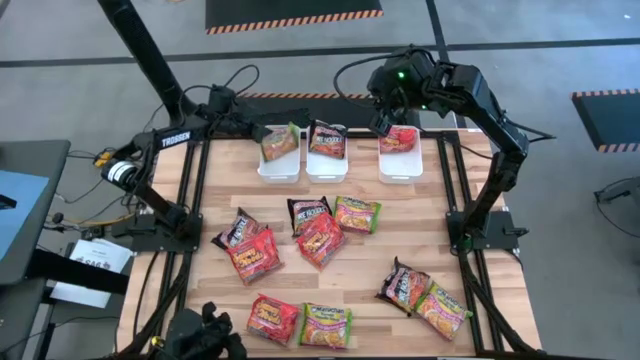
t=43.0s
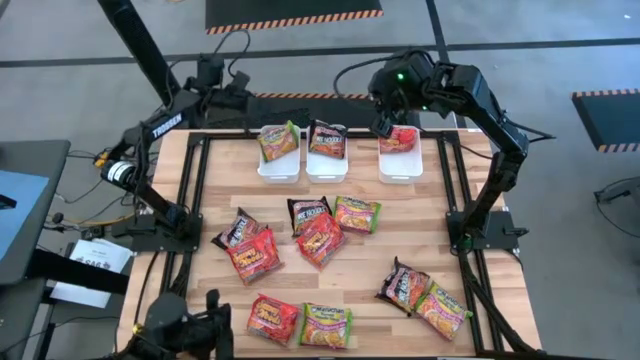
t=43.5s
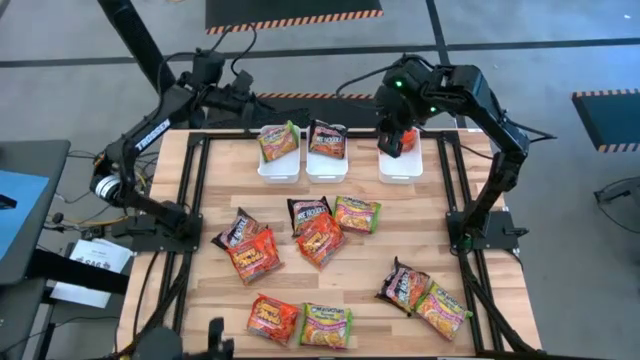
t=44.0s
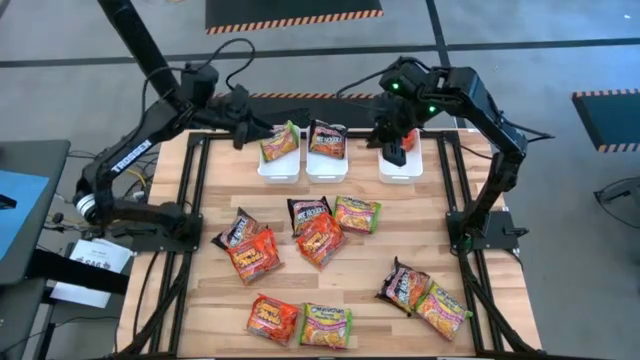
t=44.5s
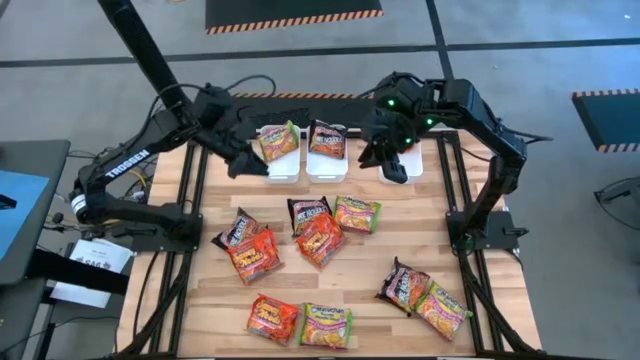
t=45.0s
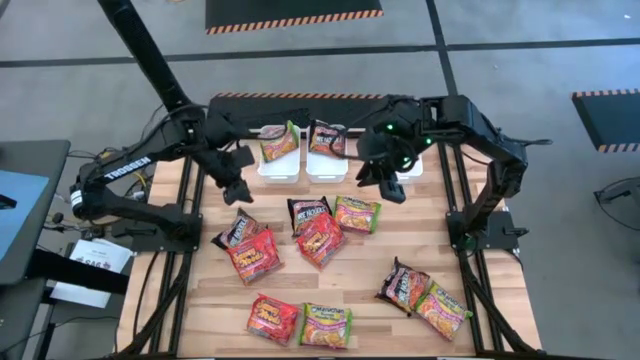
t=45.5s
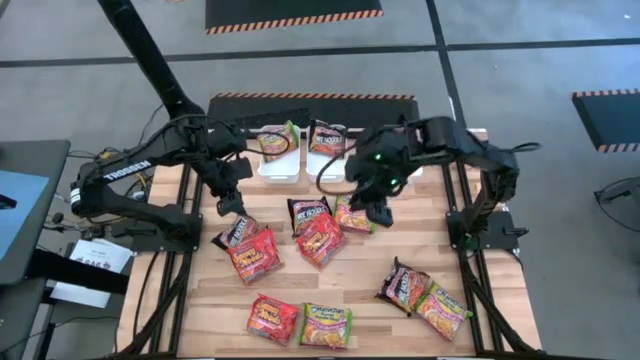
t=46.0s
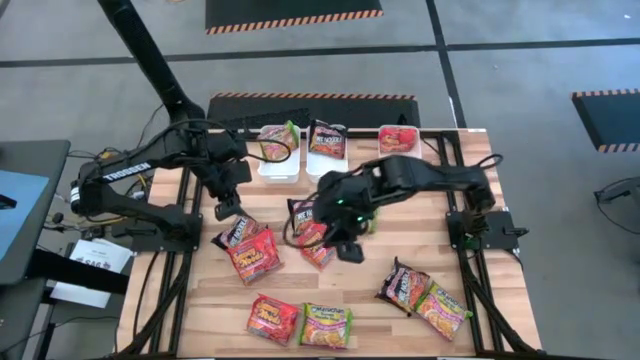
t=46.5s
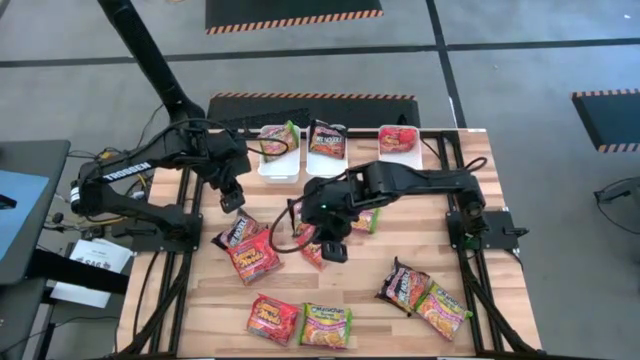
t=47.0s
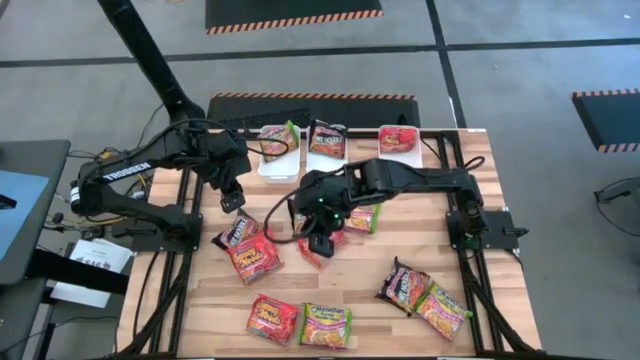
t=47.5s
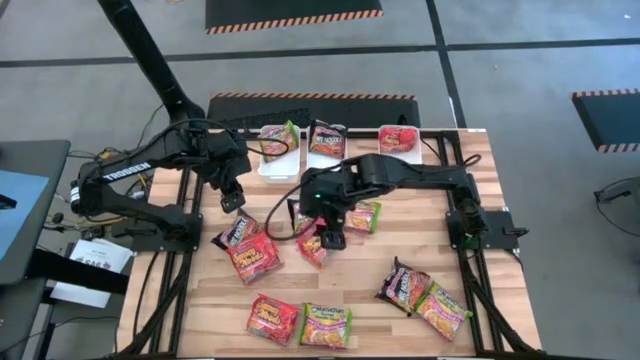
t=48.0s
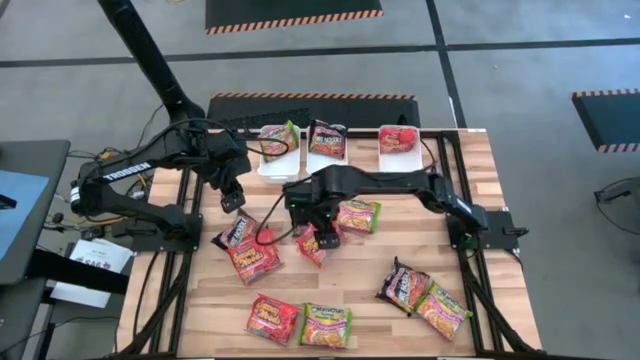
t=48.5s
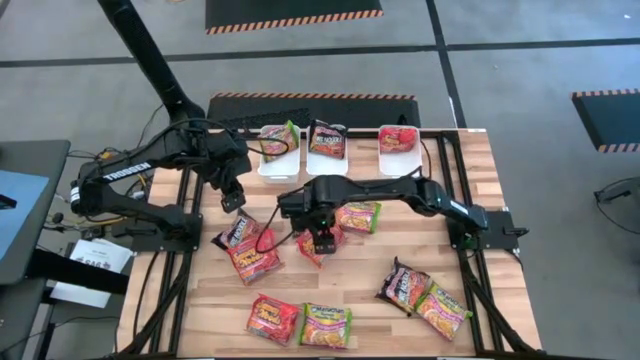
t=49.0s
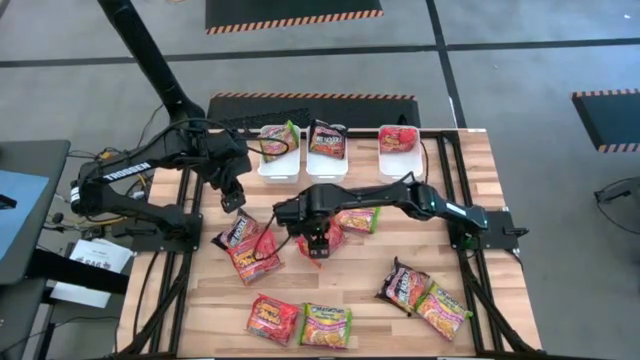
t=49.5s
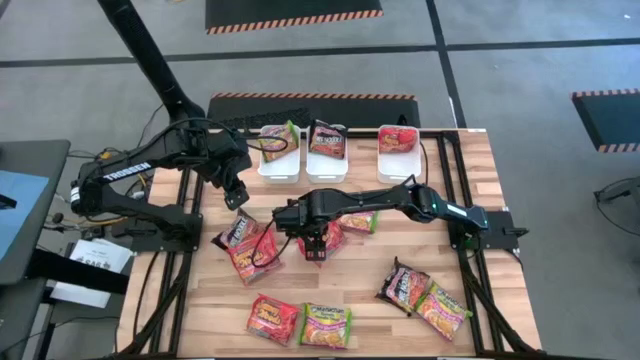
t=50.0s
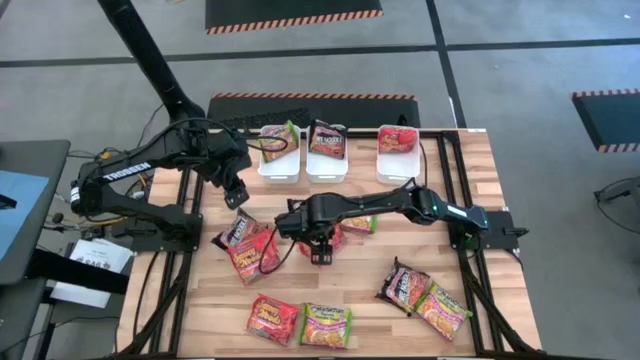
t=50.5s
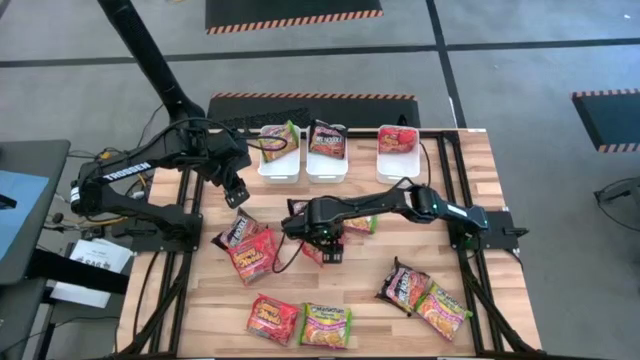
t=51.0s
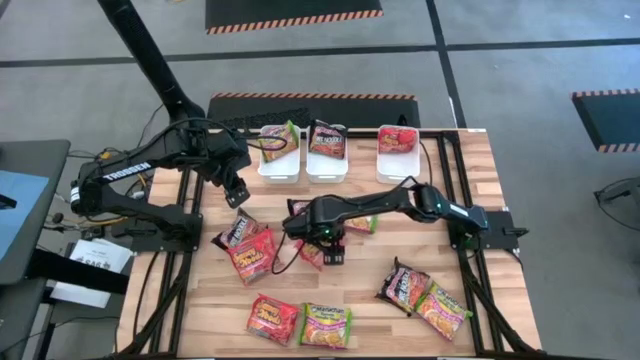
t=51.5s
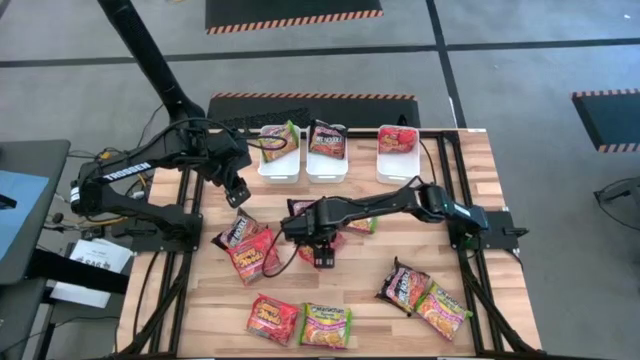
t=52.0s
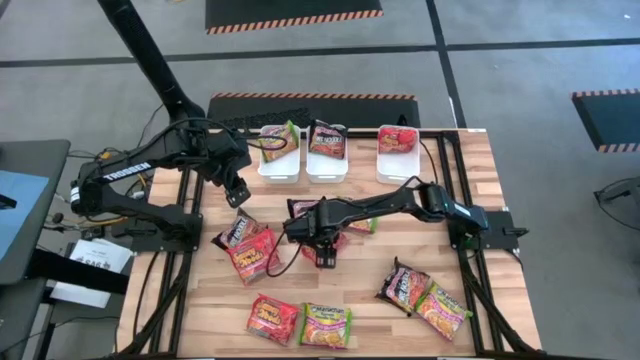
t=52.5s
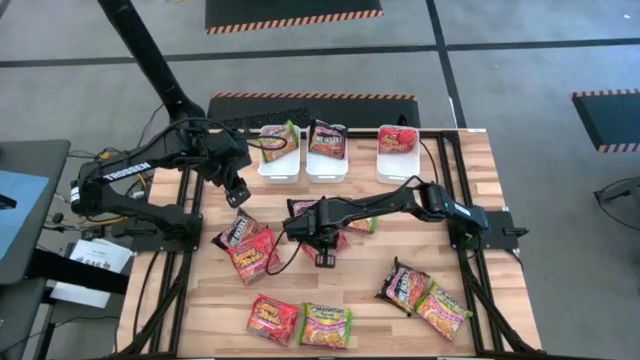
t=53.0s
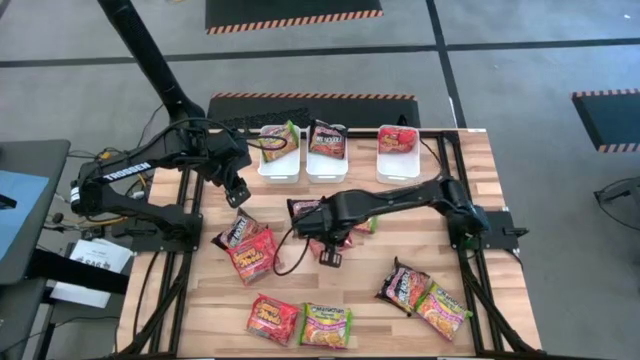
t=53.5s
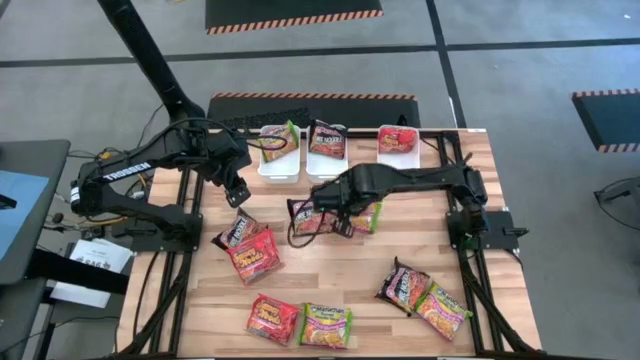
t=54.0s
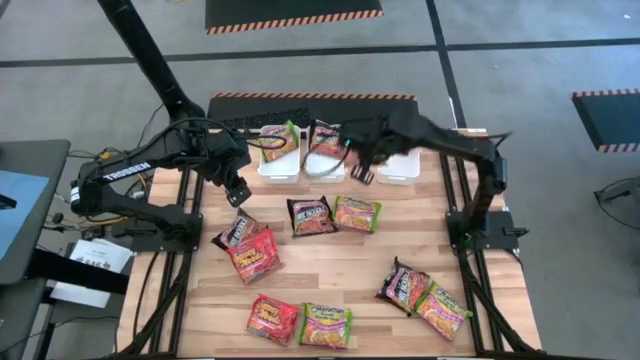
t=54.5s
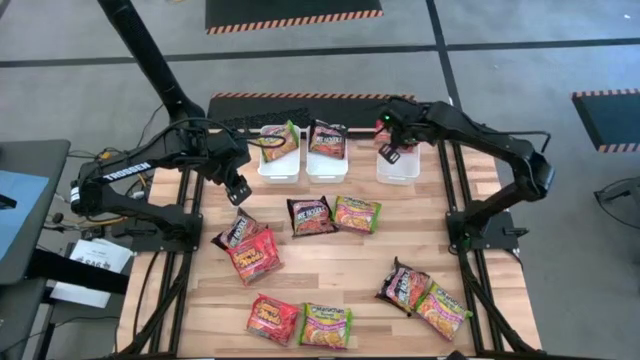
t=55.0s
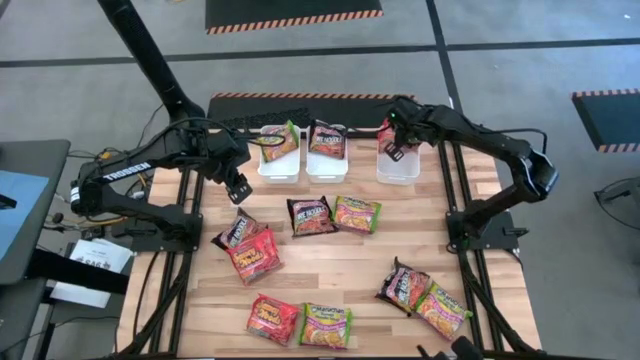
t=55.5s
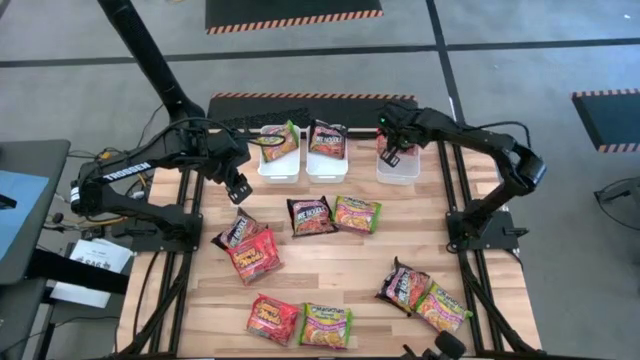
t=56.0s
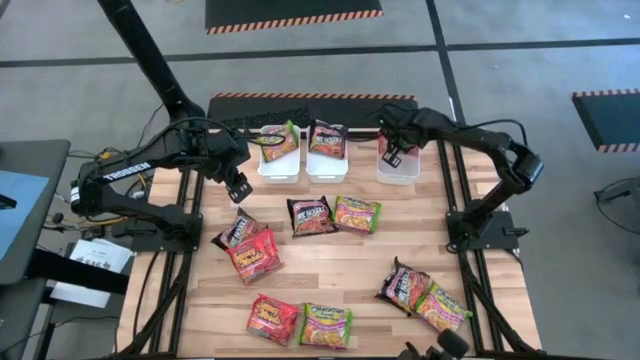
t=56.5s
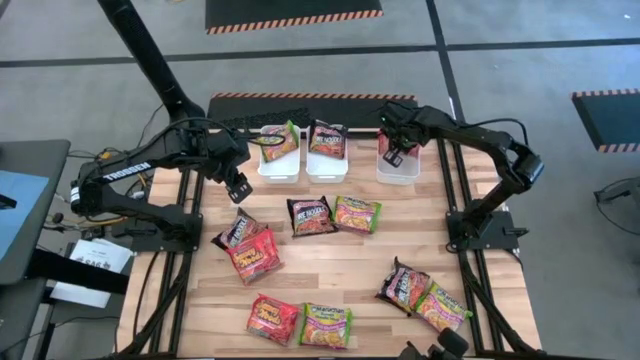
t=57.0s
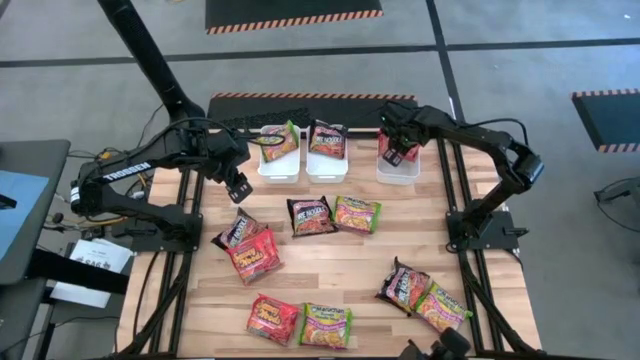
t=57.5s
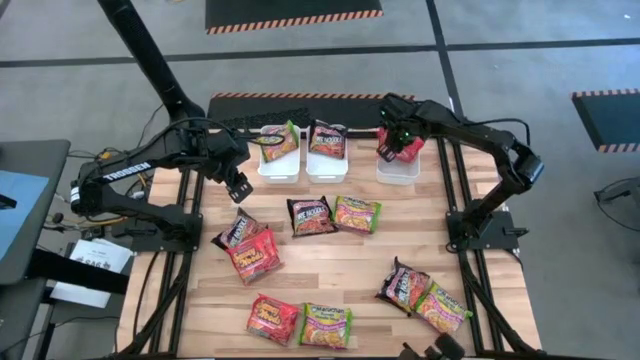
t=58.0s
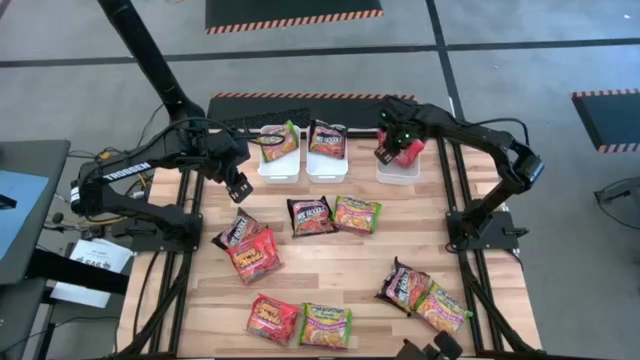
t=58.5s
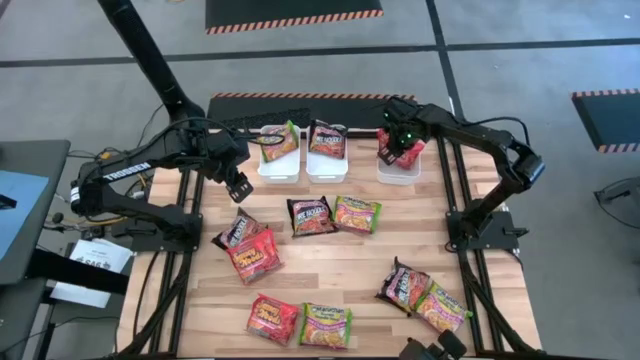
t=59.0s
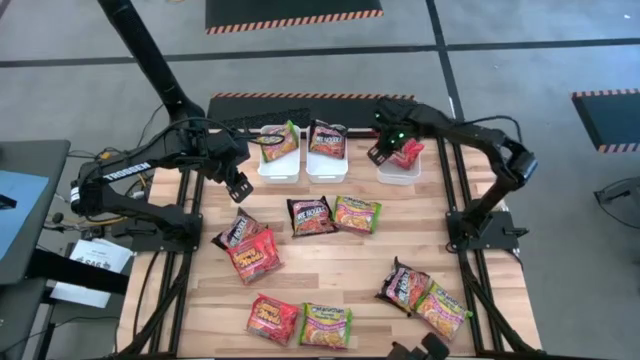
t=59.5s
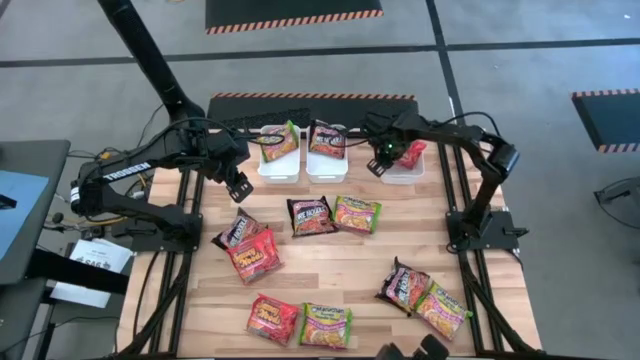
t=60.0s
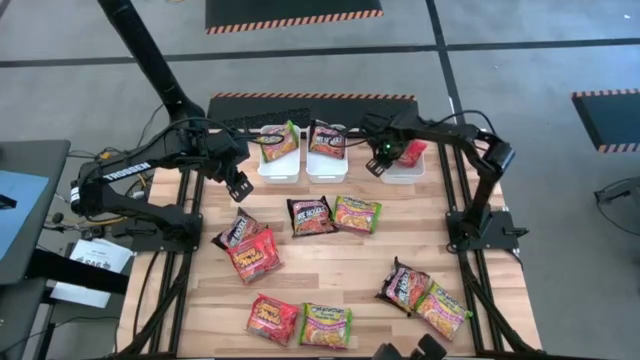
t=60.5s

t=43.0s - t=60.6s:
Task: Sort Maruchan noodles
Put the orange noodle pack into the right white bin

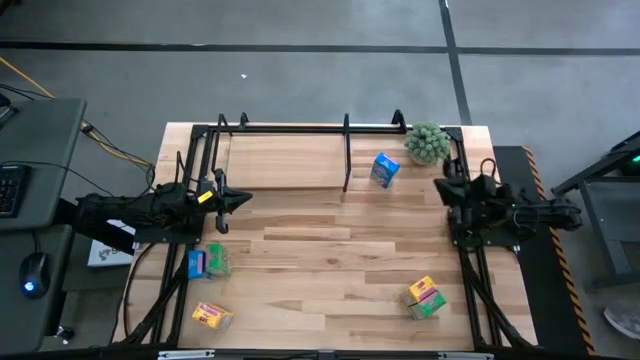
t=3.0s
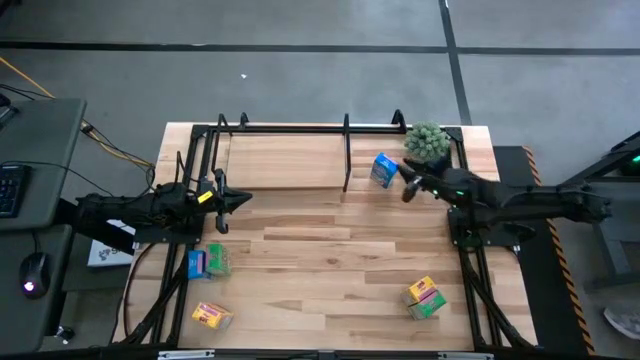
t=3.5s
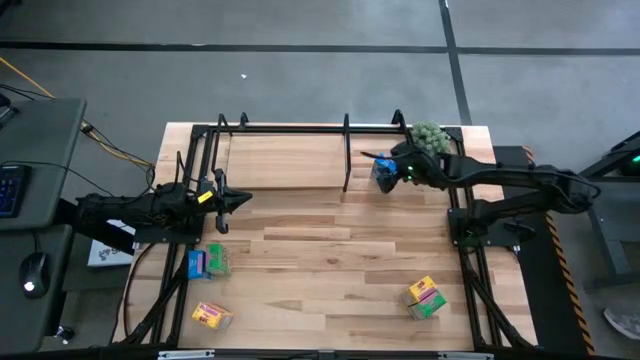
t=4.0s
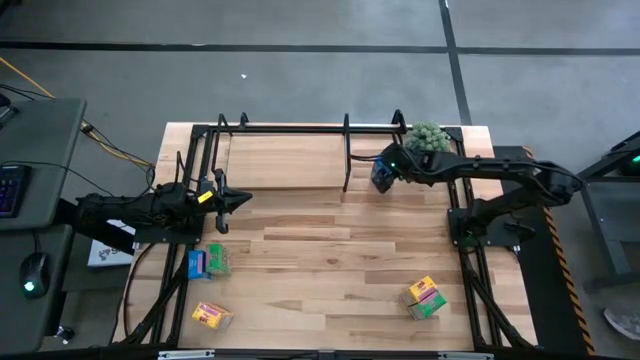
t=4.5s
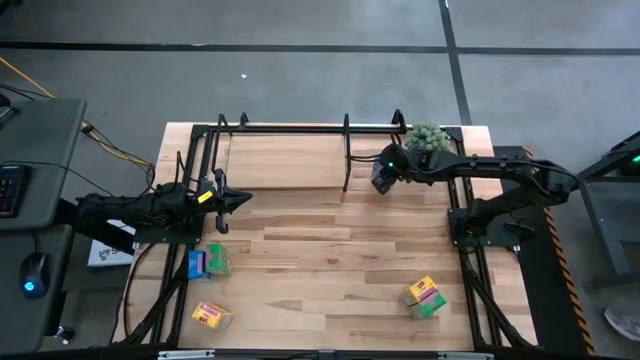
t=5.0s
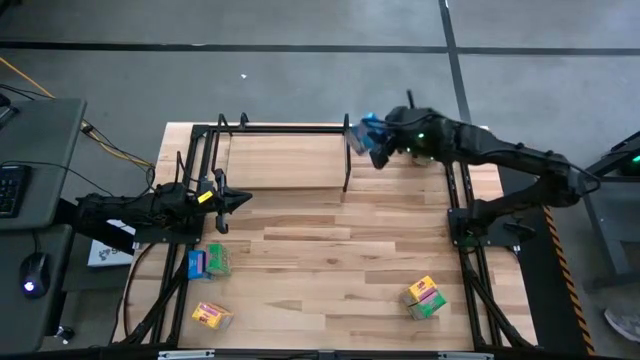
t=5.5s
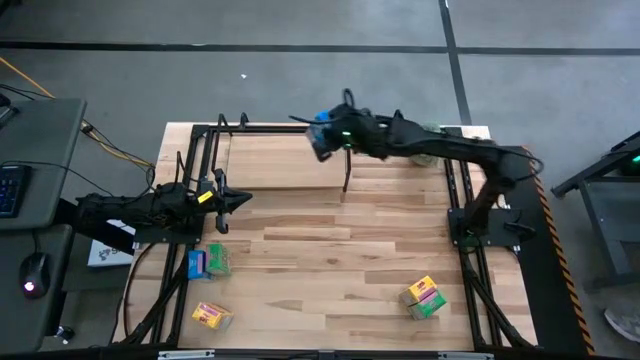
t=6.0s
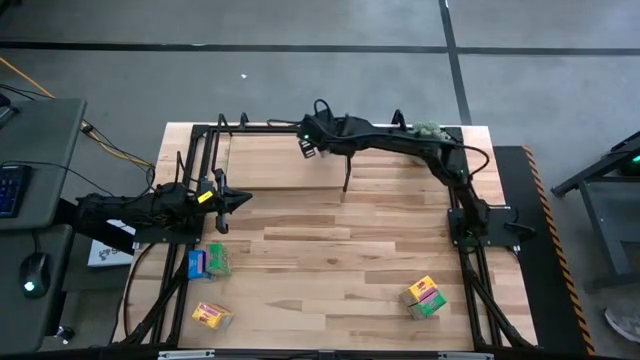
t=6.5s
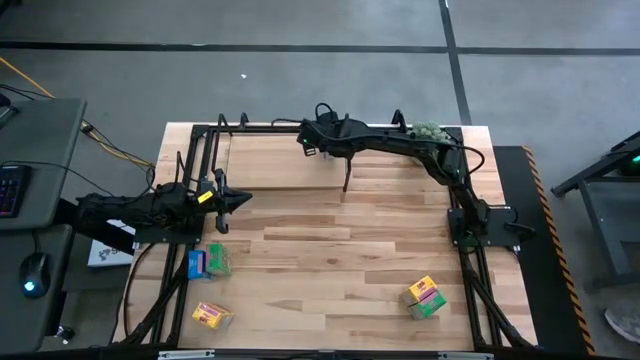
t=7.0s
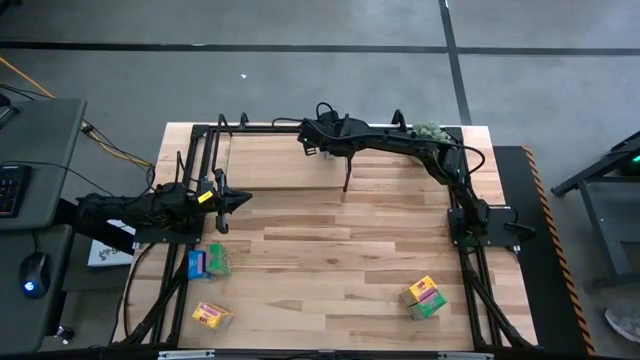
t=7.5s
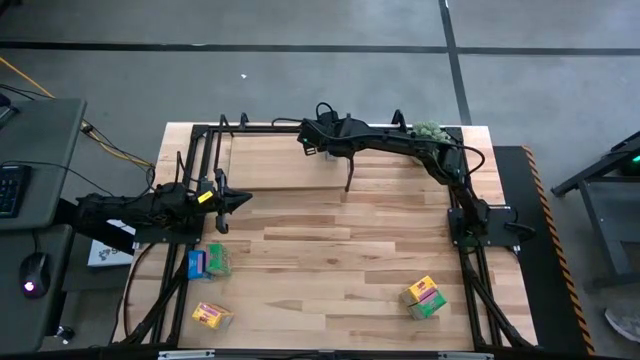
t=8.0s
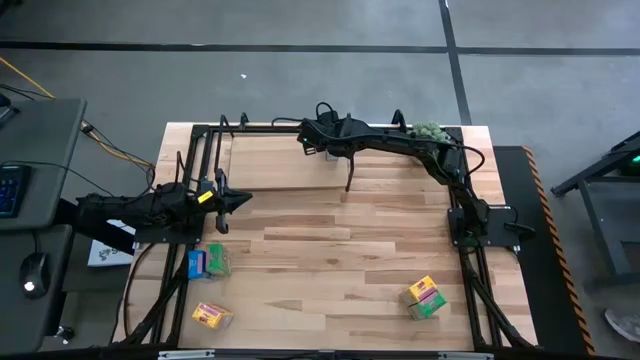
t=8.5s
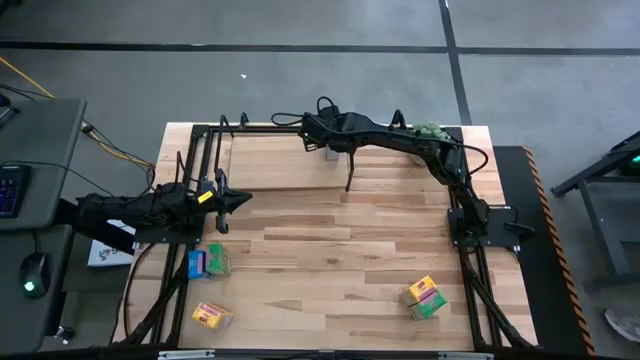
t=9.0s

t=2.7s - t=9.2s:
Task: Stack cereal on shelf
Put the top blue cereal box on the shelf
